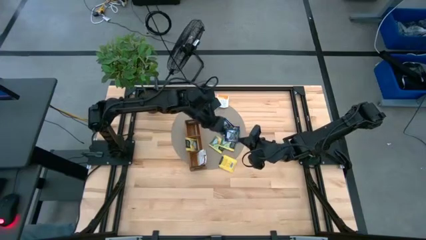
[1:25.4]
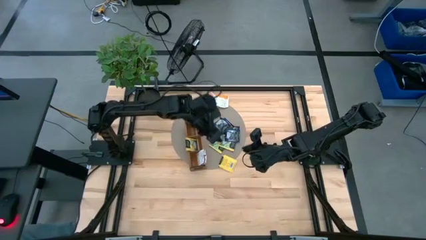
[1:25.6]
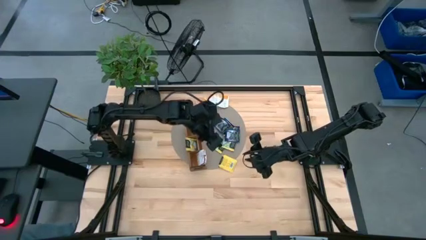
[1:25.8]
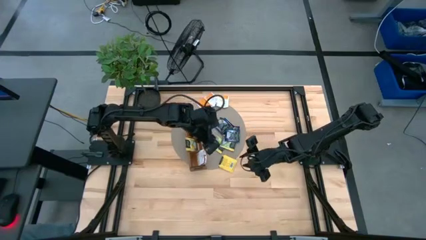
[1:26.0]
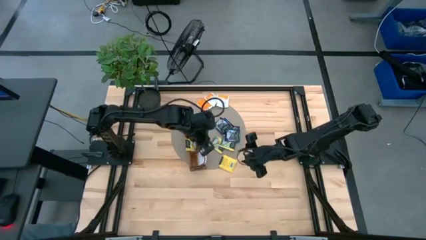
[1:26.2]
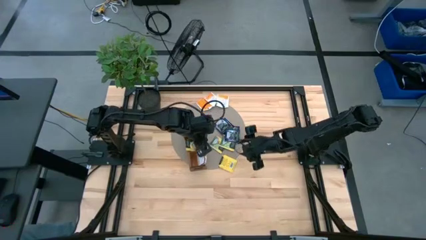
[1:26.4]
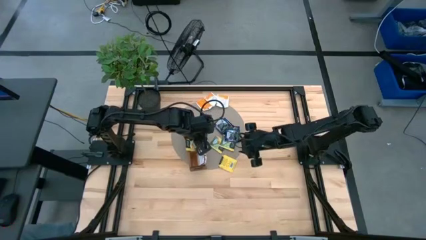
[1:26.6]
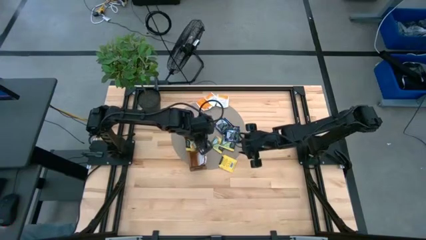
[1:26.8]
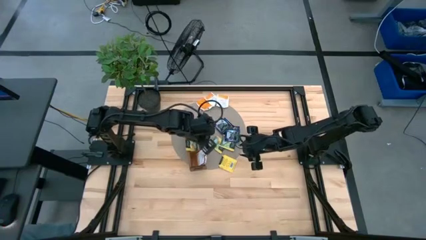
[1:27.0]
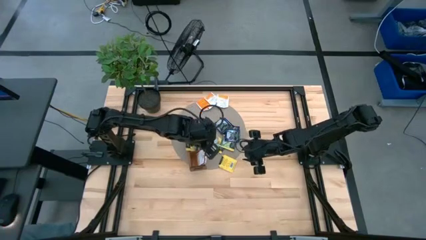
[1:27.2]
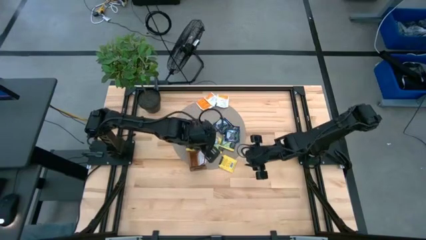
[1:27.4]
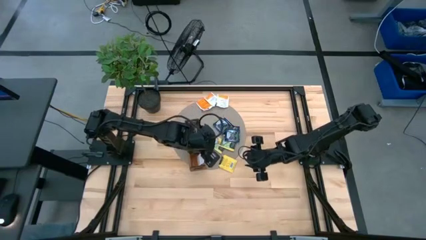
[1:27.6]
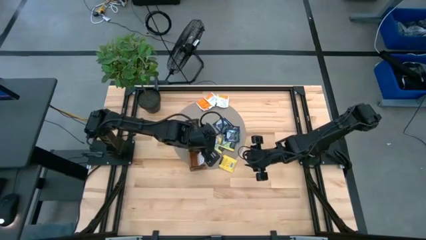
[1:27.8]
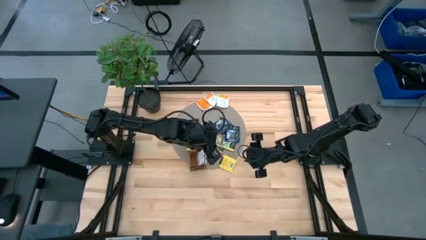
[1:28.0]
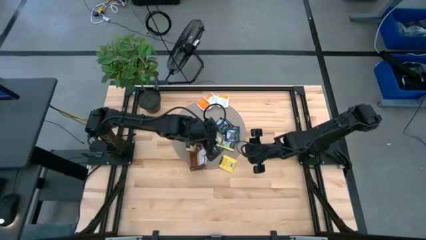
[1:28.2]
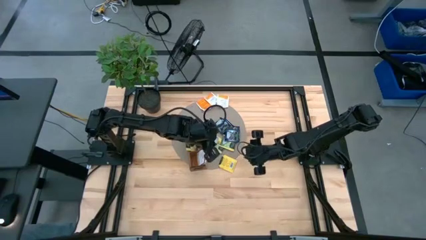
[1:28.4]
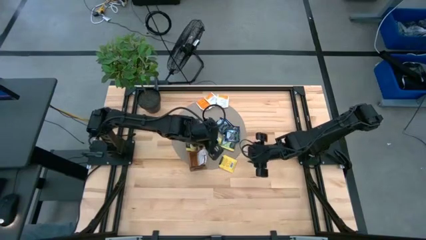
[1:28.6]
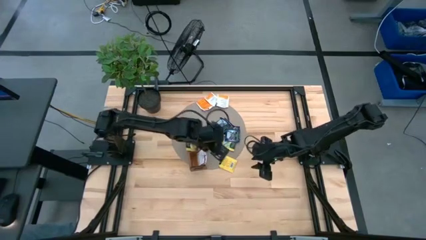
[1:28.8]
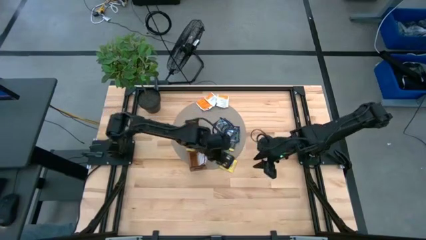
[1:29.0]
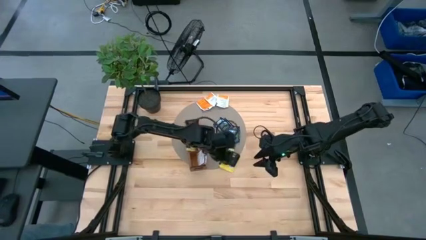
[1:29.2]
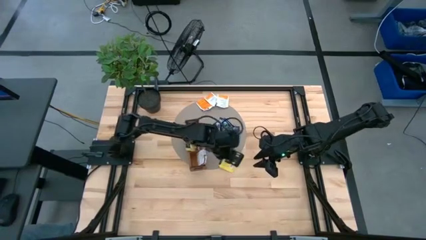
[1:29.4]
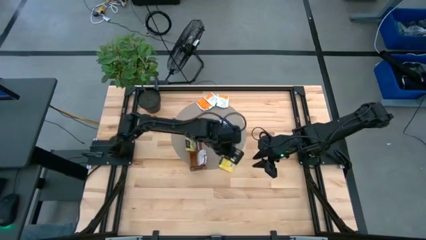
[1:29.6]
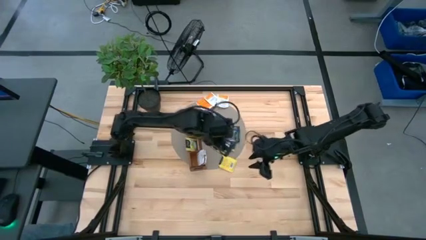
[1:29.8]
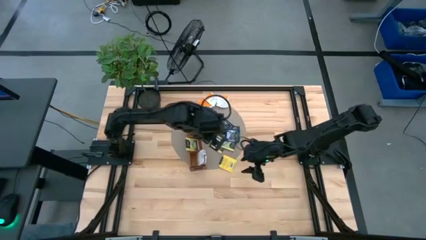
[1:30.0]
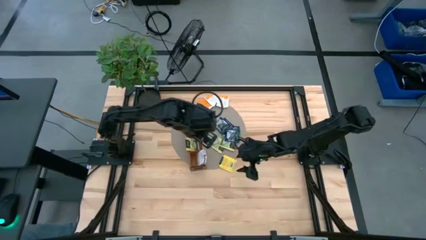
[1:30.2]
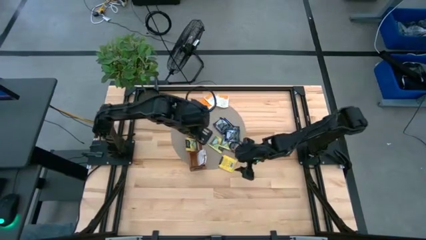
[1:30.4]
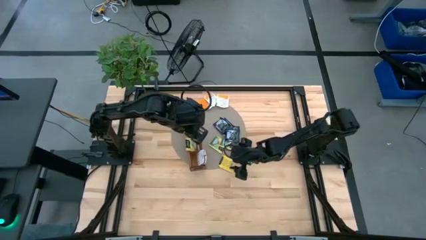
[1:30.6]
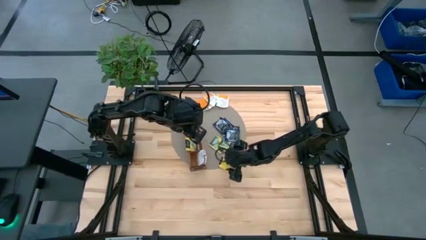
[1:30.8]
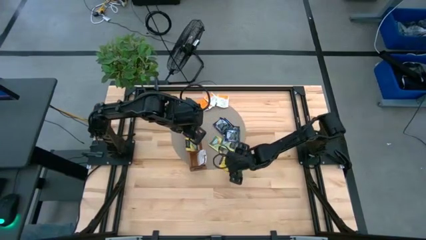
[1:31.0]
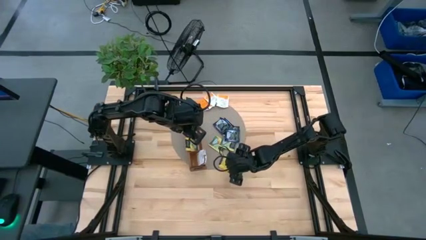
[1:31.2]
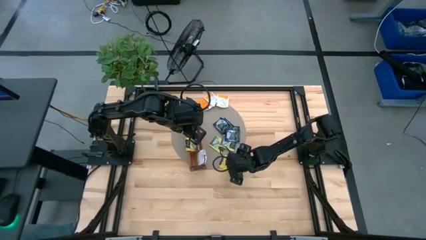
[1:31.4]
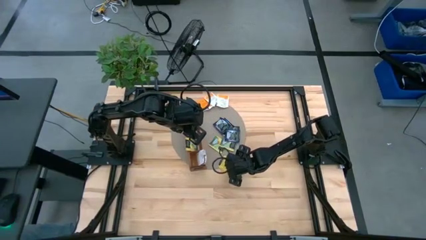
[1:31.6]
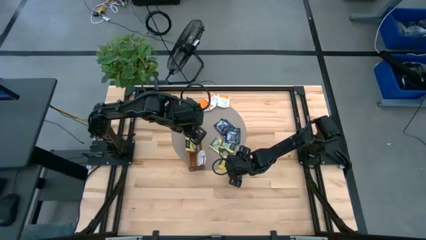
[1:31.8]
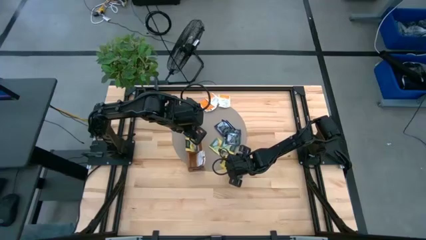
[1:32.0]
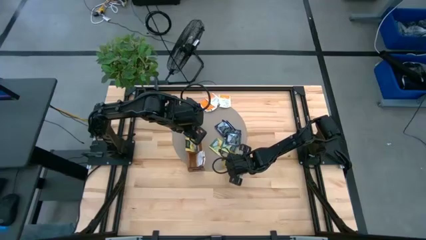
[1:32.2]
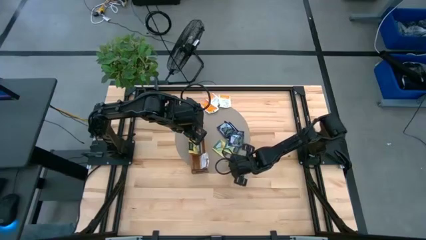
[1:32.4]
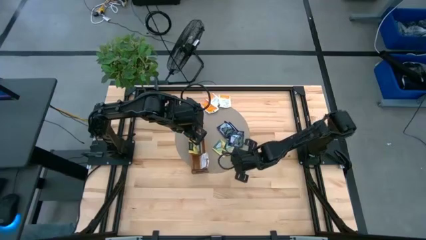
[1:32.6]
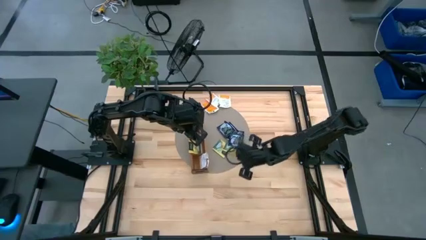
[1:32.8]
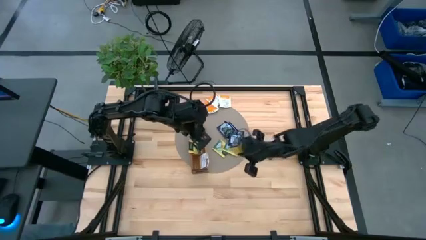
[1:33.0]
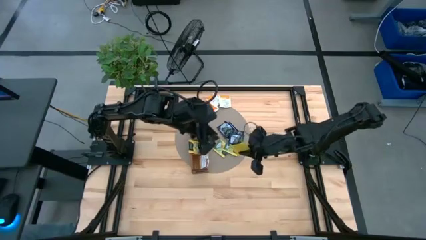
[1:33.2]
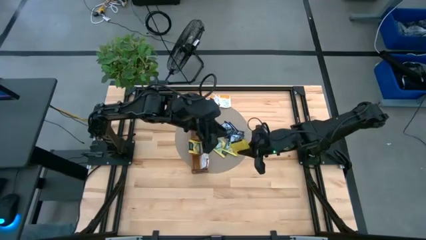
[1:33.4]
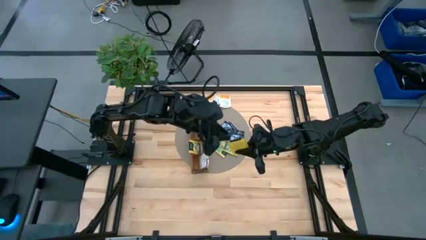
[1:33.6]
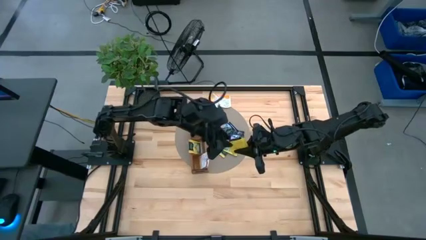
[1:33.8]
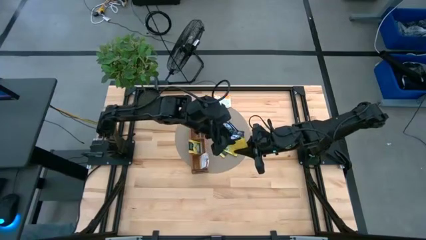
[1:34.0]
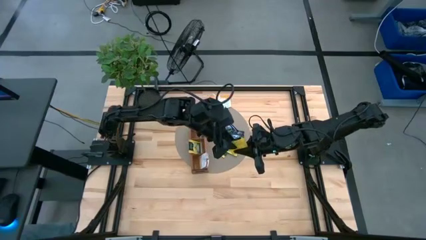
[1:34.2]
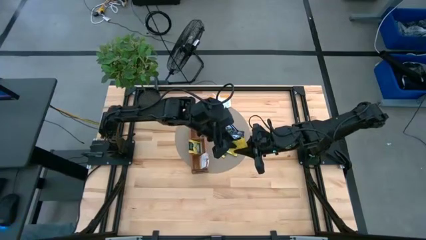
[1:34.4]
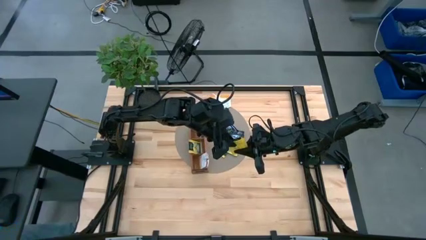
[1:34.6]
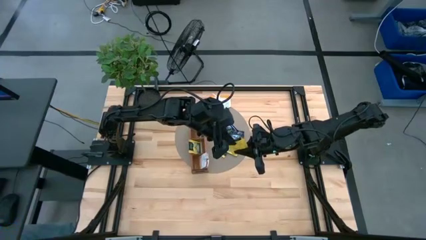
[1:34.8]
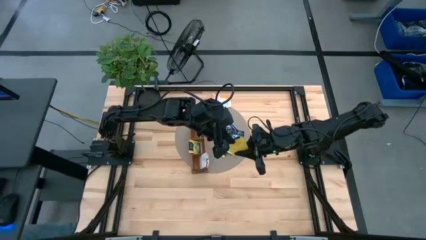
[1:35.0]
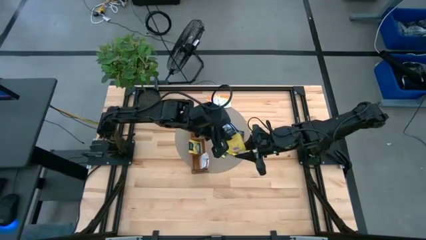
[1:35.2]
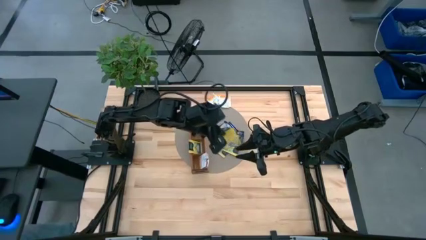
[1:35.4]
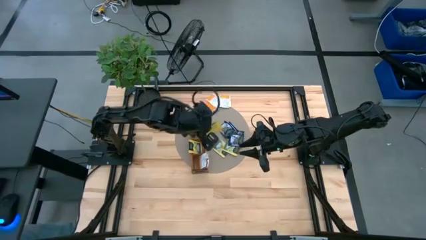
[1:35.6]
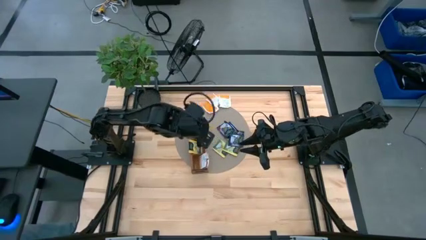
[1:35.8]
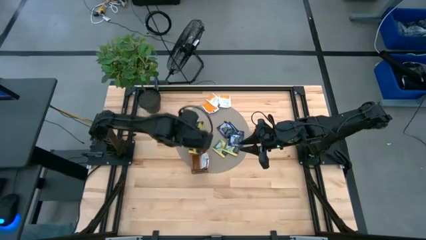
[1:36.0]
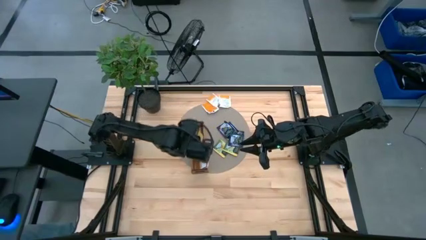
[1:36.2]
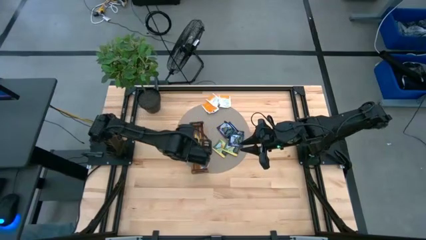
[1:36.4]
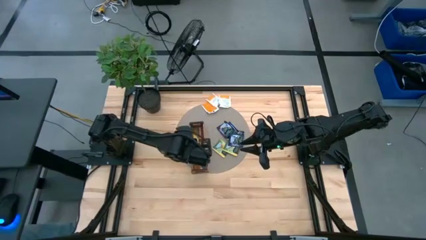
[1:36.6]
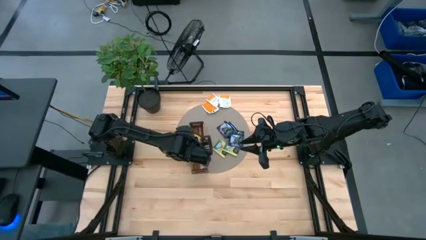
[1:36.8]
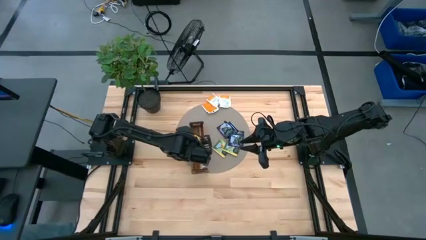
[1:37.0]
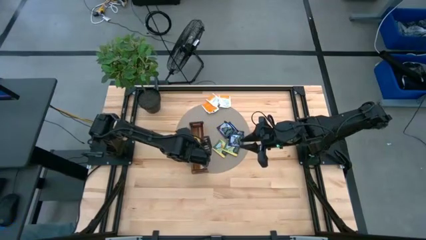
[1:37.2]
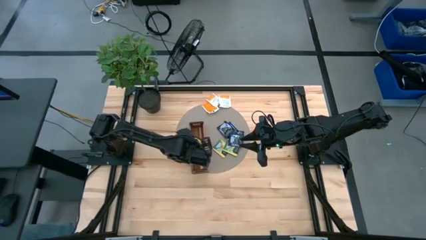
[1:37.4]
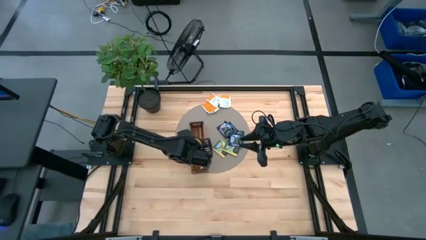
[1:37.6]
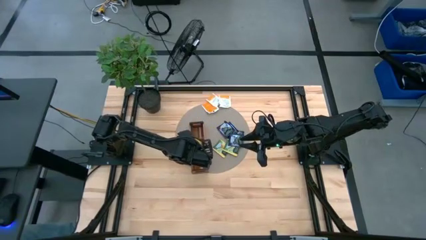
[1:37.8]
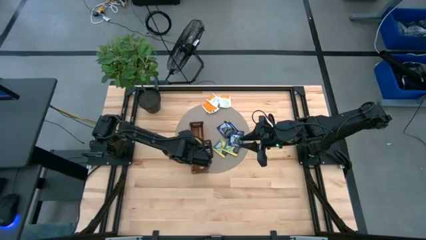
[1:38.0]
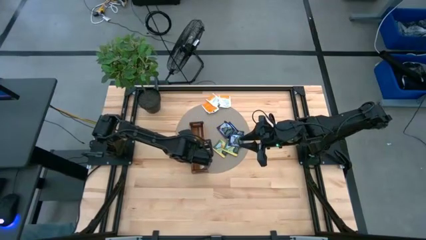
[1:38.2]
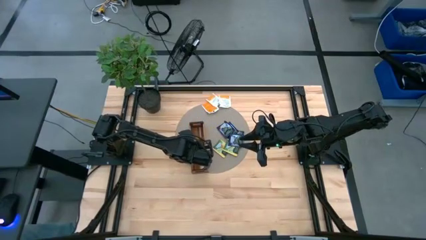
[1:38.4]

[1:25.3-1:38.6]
Task: Pick & Place Tea
Put the yellow tea bag into the middle section of the wooden organizer
